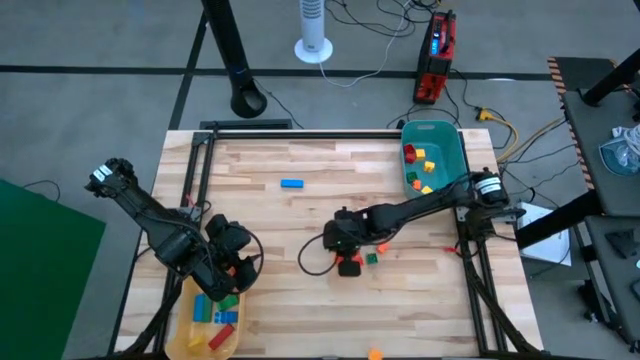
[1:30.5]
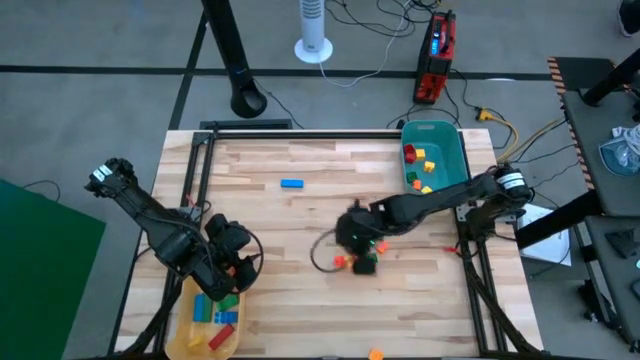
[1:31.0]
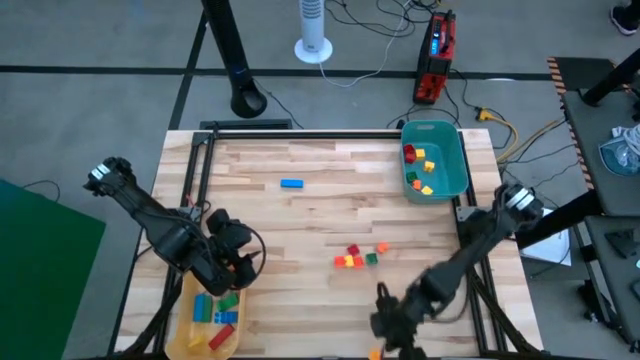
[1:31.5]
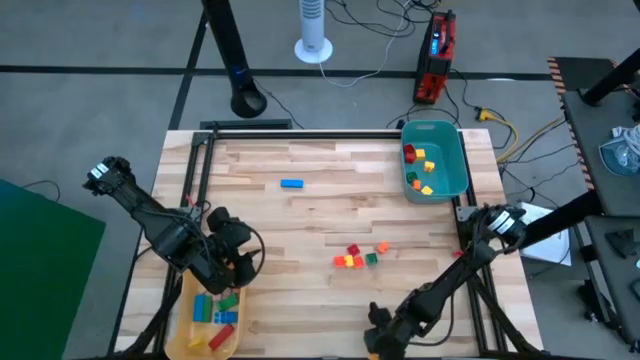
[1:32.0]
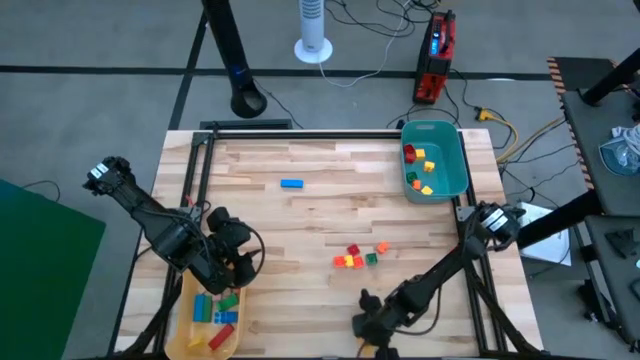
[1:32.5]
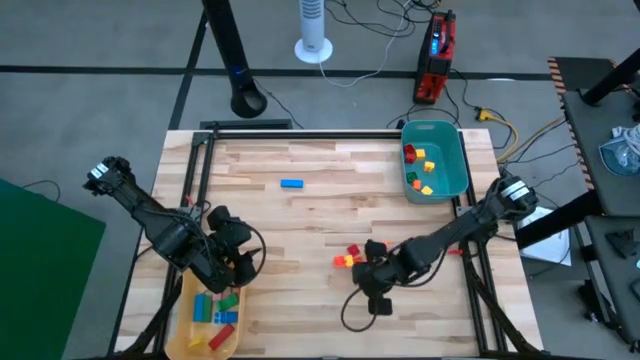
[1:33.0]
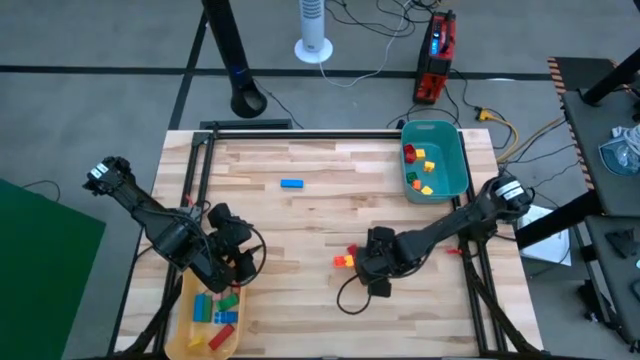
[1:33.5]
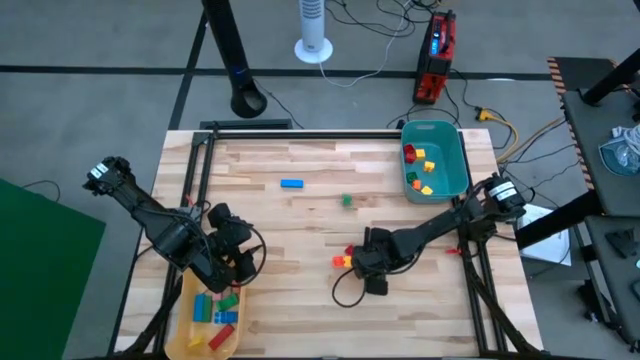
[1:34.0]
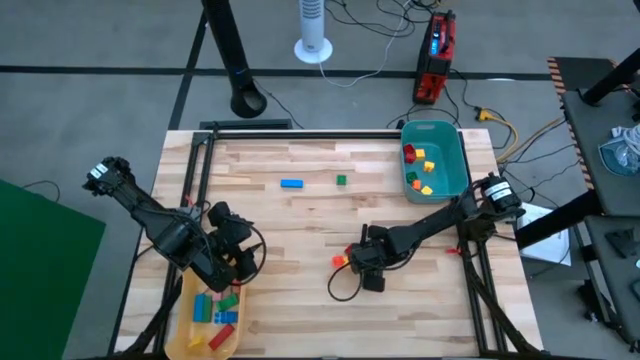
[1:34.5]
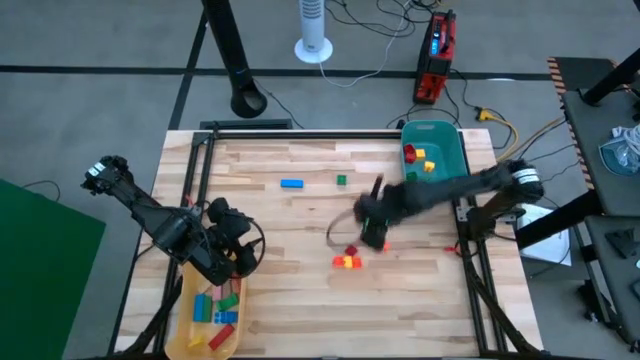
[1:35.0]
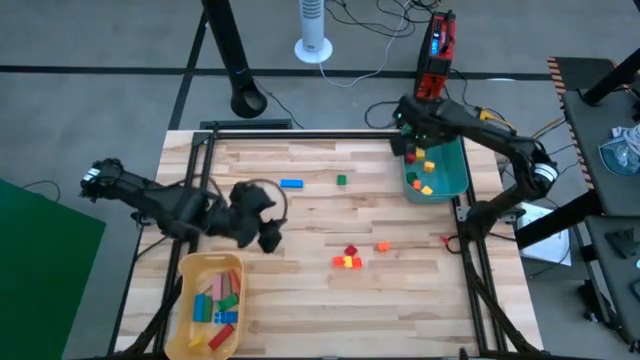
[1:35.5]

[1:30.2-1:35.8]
Task: Sort blocks
Put the yellow 4-stud game piece into the green bin

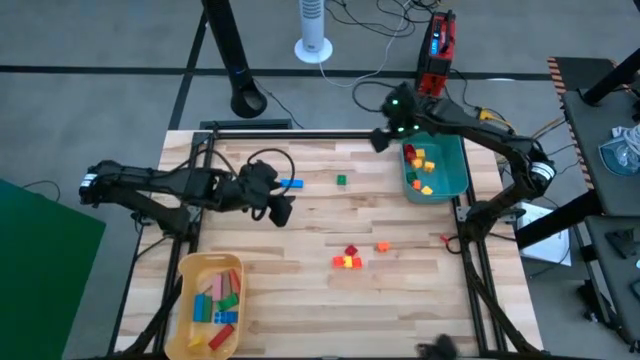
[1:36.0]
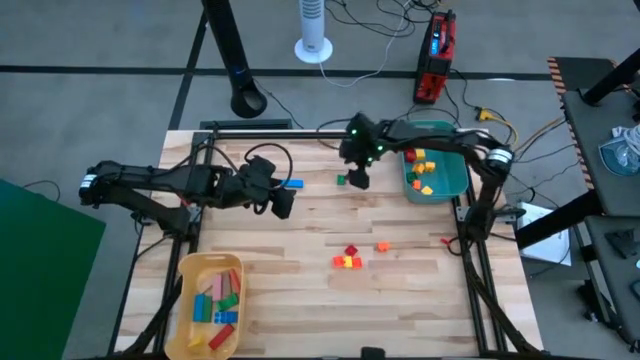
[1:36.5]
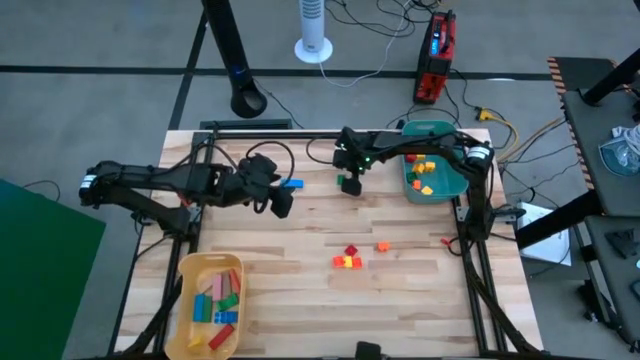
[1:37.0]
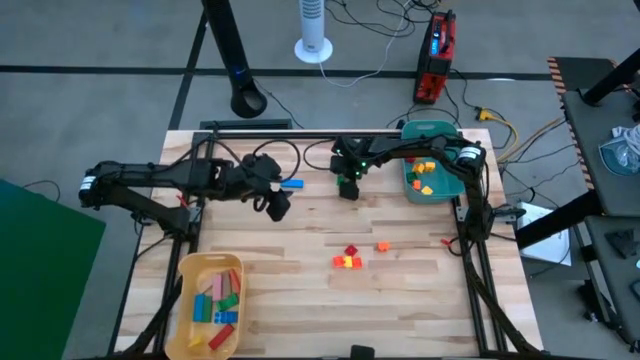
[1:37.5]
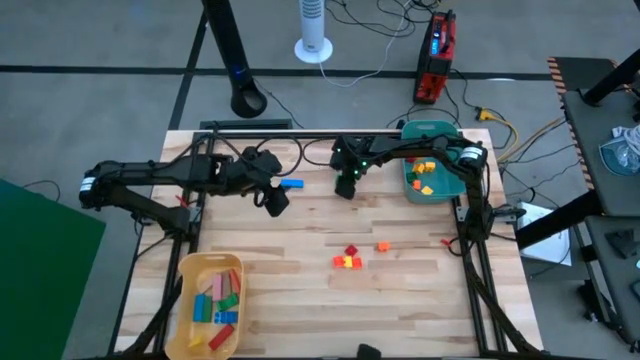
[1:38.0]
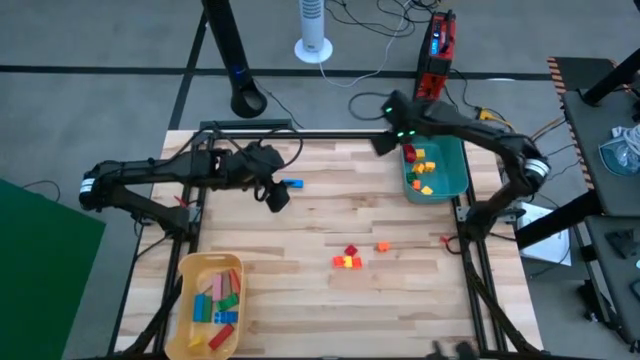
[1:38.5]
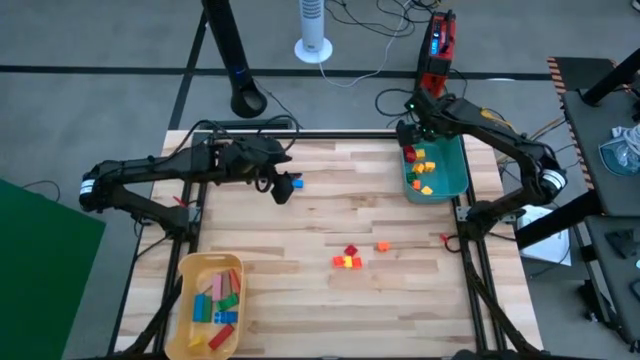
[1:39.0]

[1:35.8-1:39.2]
Put the green 4-stud game piece into the green bin

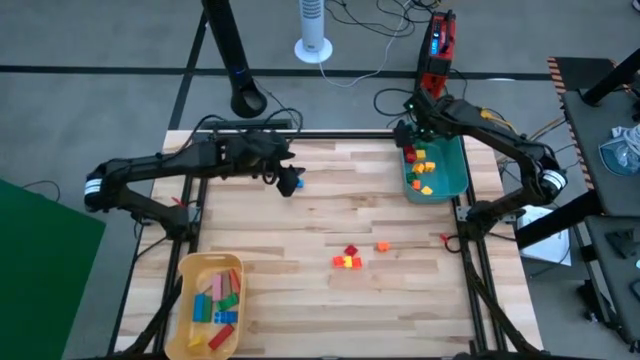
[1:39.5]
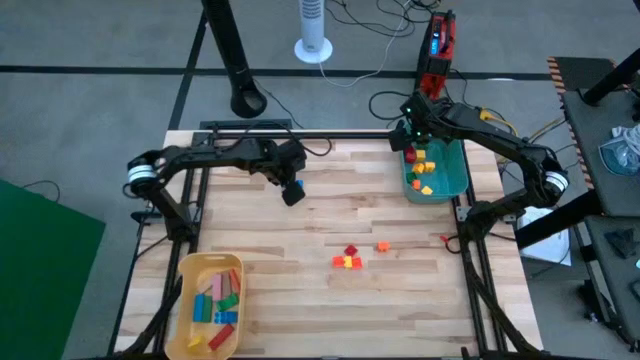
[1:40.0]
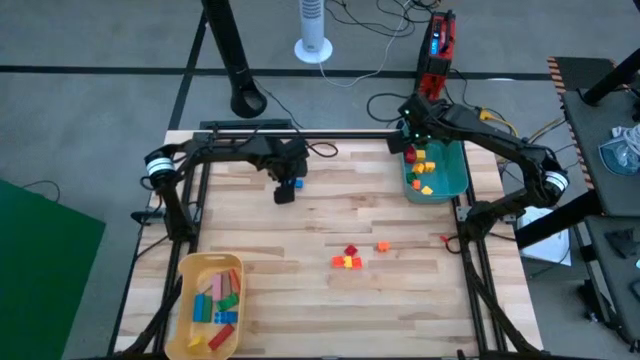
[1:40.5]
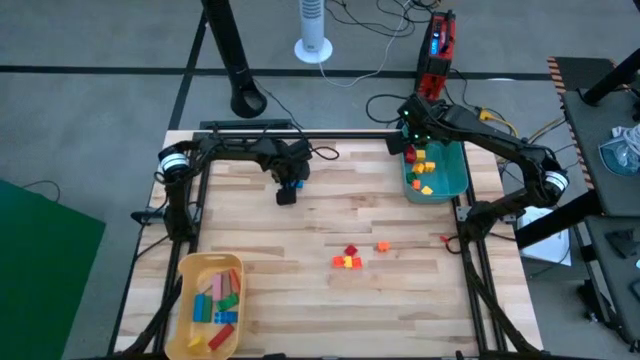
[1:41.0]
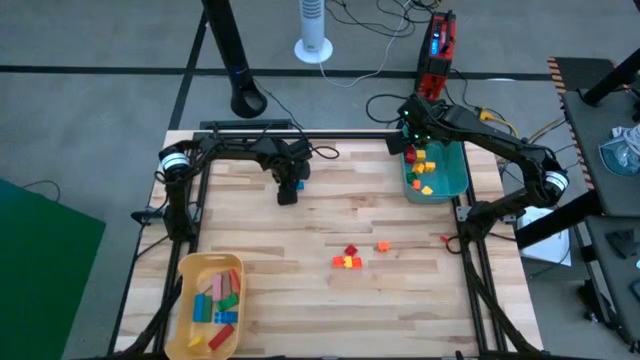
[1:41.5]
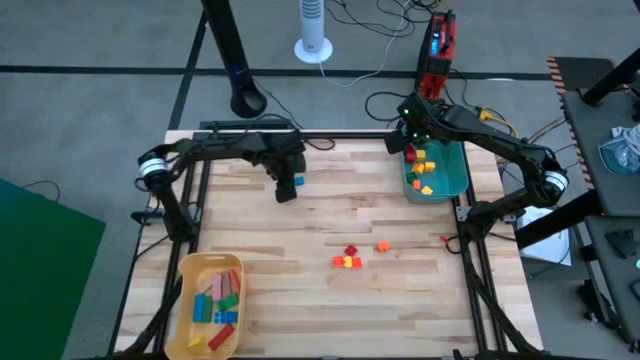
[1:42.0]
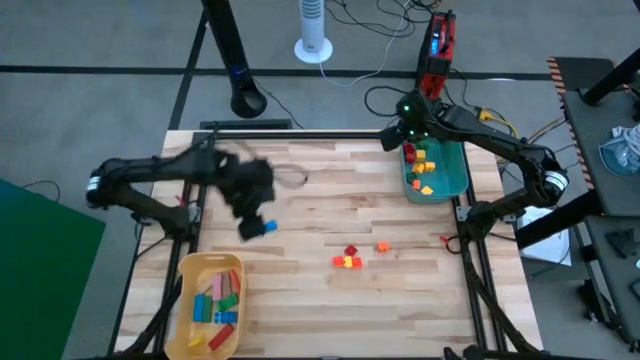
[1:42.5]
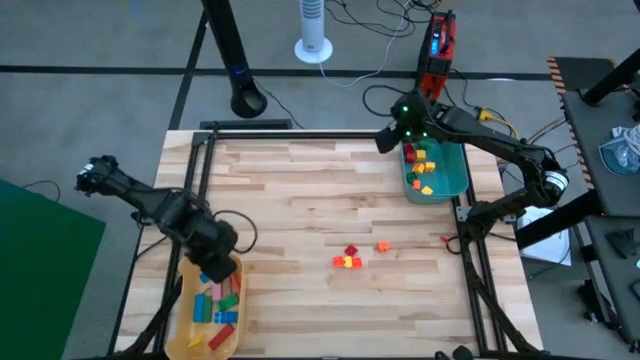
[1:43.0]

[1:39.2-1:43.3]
Put the blue rectangular block into the yellow bin

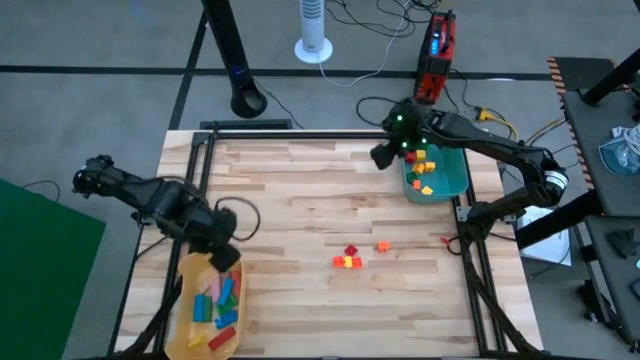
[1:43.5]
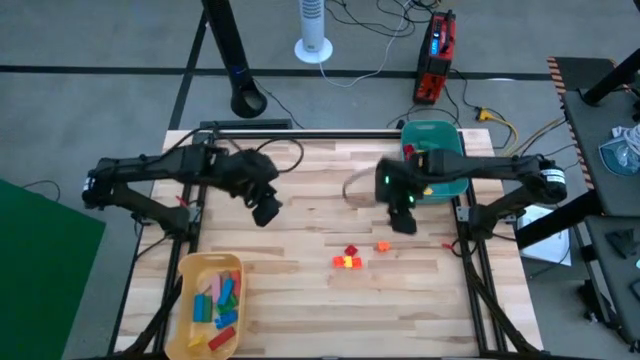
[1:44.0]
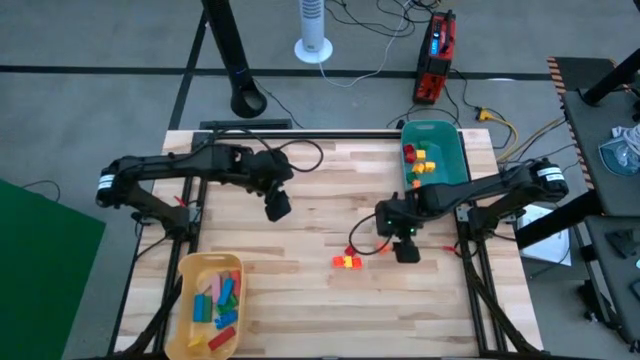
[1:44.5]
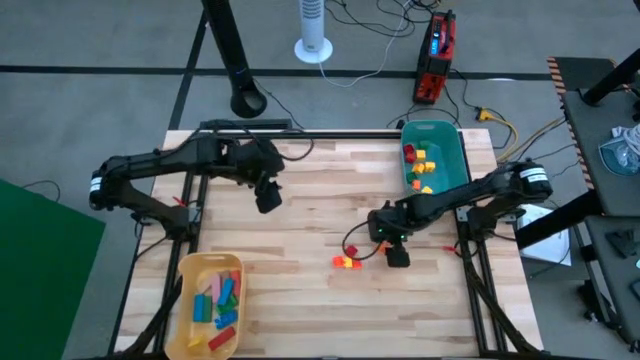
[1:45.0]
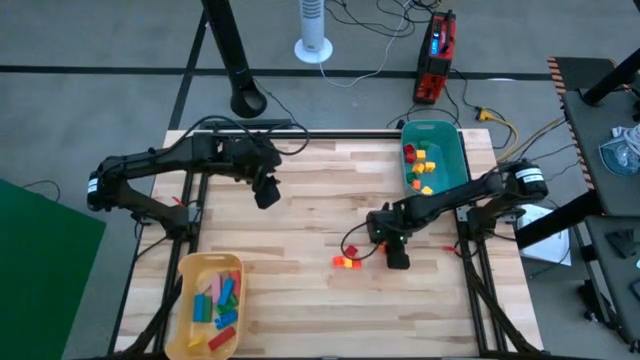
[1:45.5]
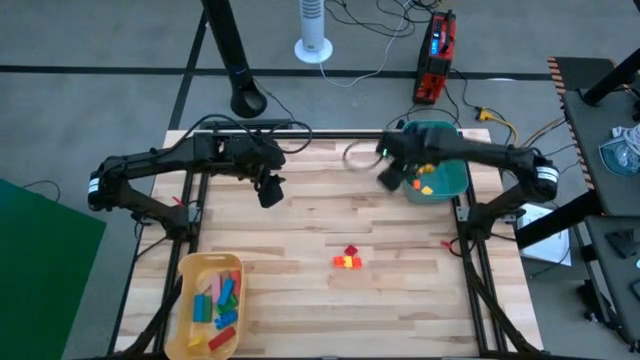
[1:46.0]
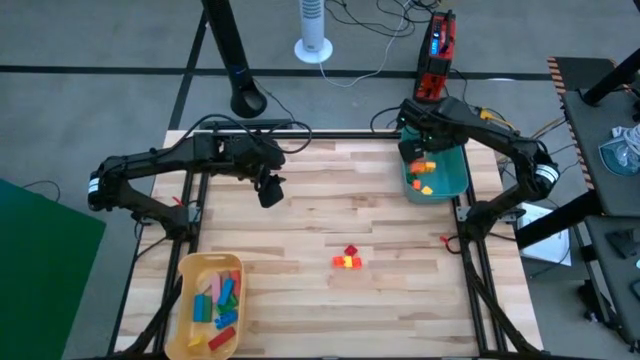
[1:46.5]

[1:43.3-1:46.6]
Put the orange 4-stud game piece into the green bin

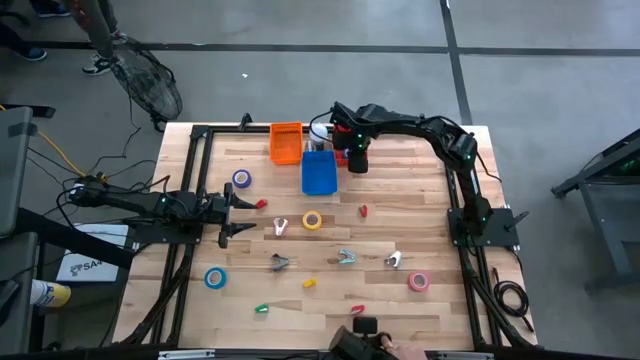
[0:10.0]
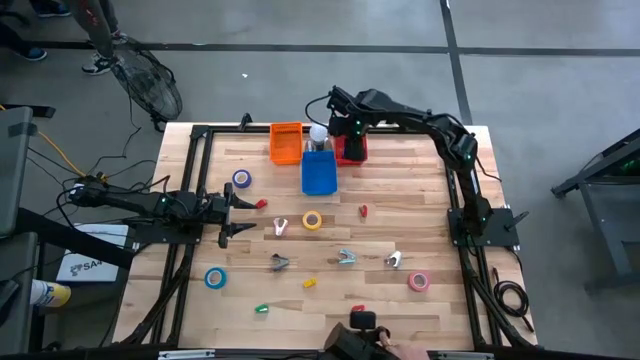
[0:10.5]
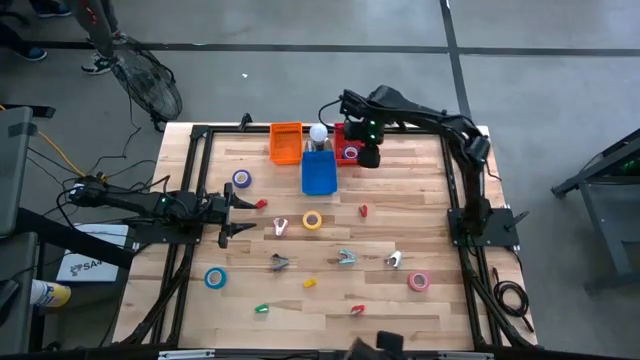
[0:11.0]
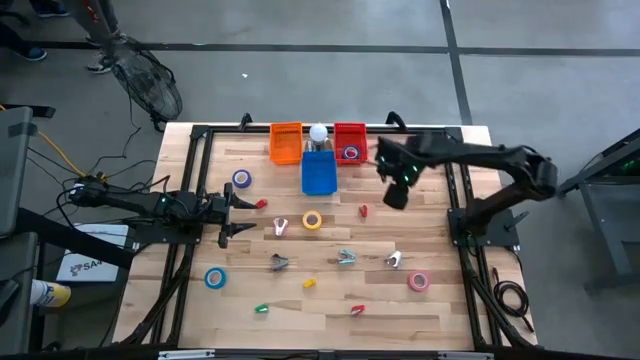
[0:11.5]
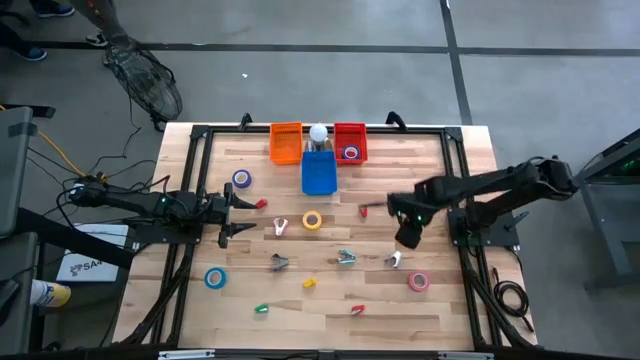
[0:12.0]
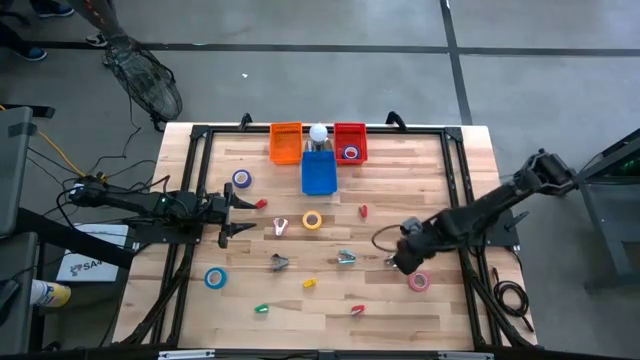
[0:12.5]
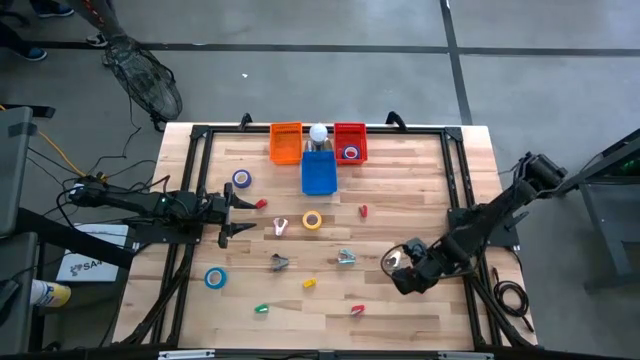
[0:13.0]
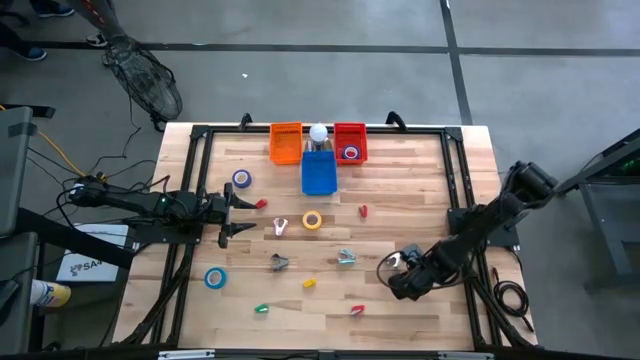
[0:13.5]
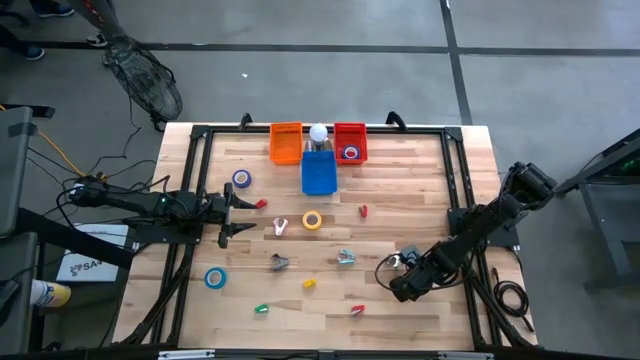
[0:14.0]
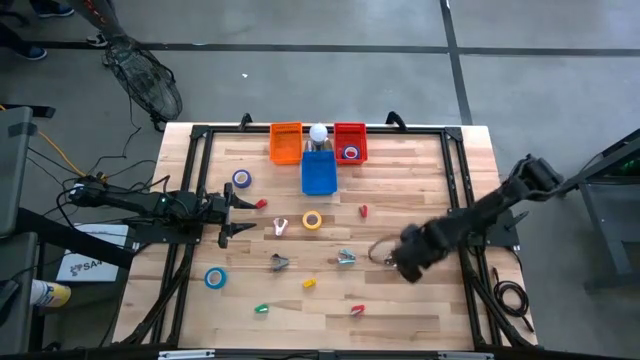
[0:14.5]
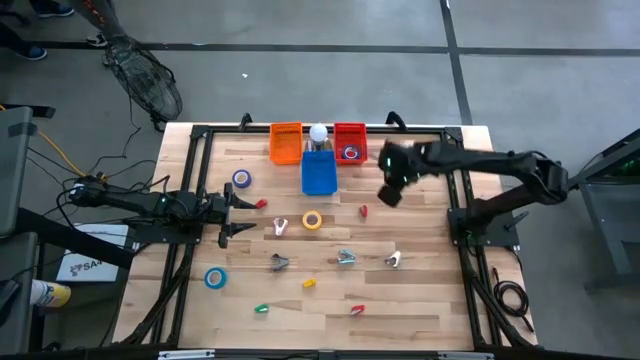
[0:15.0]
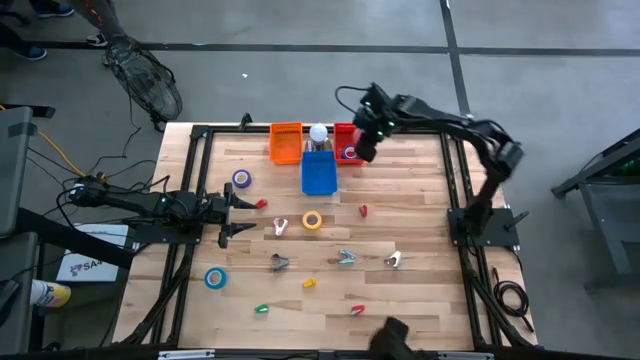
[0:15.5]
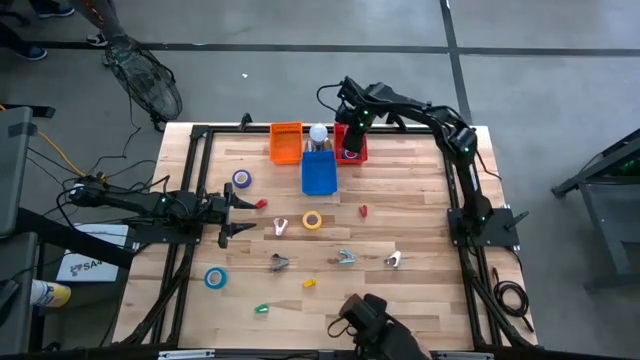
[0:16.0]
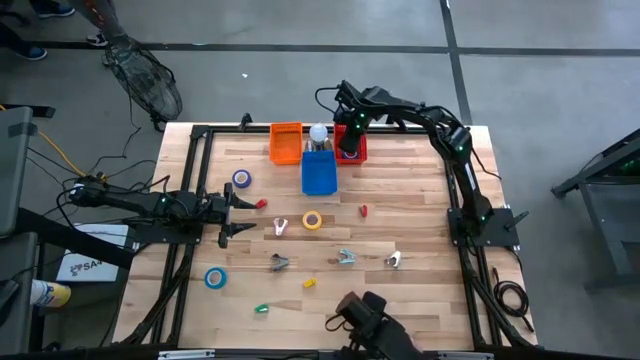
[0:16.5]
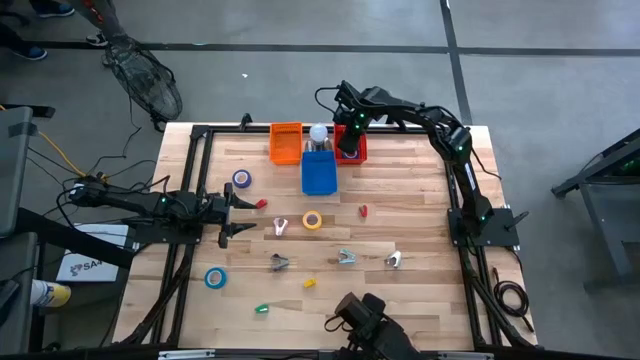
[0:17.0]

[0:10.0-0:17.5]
Task: Pick and place Stapler, Stapler remover, tape
Put the pink tape into the red basket
